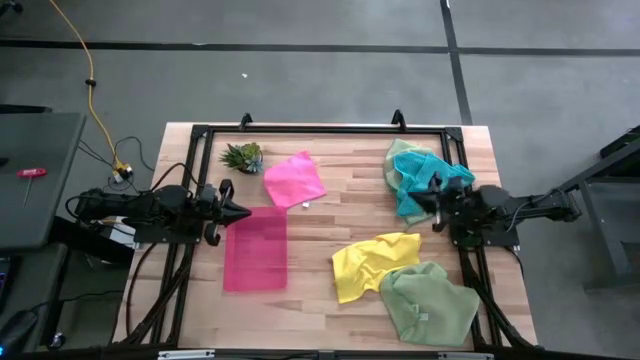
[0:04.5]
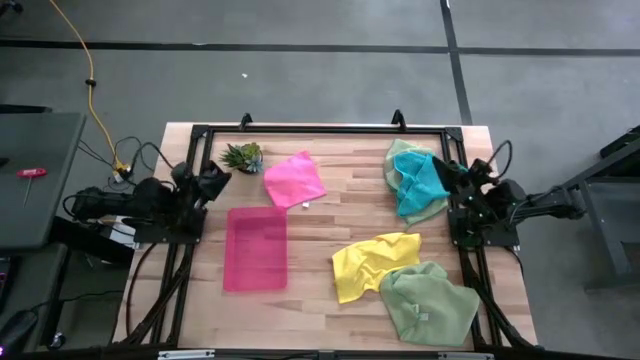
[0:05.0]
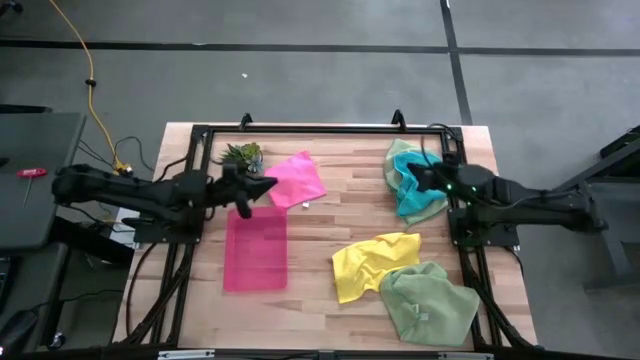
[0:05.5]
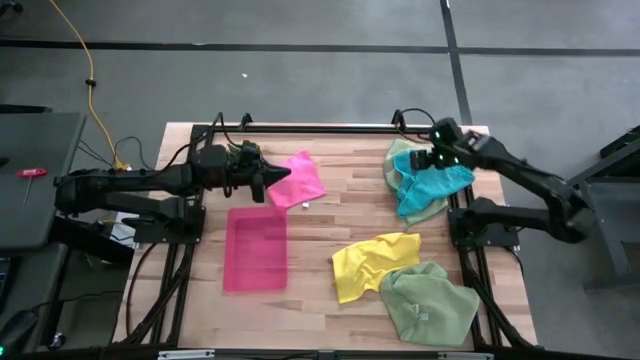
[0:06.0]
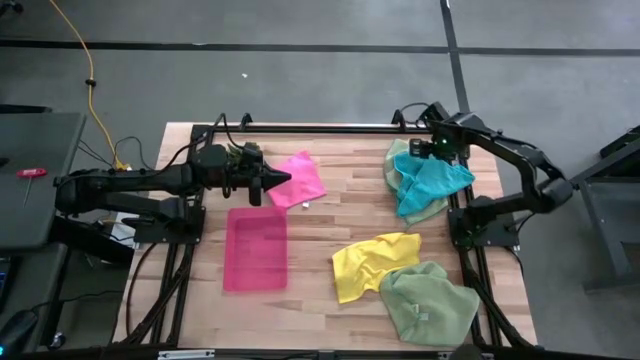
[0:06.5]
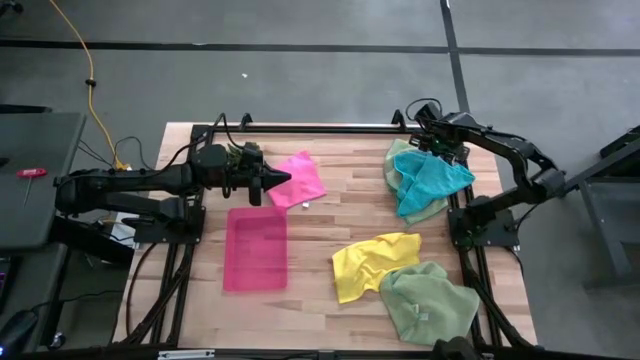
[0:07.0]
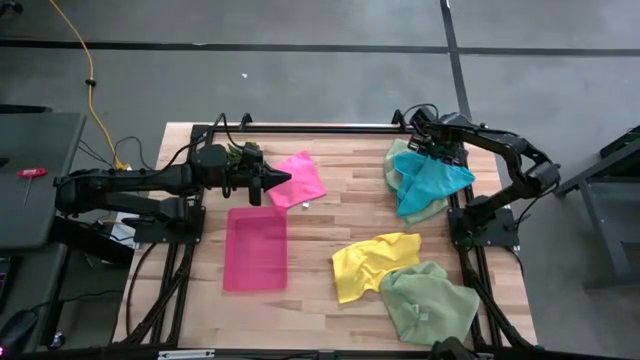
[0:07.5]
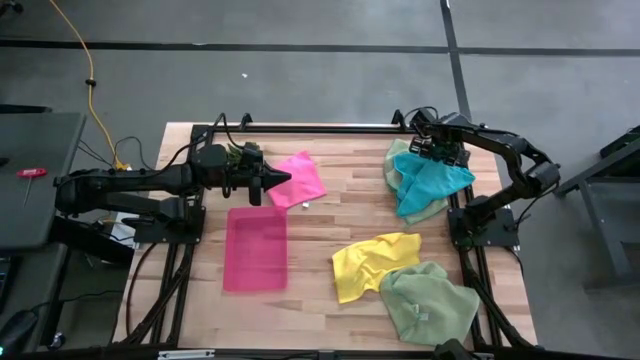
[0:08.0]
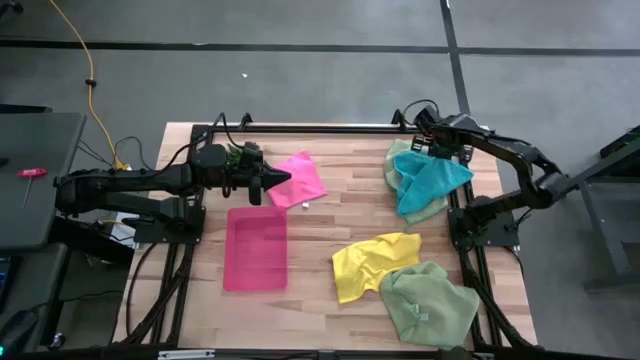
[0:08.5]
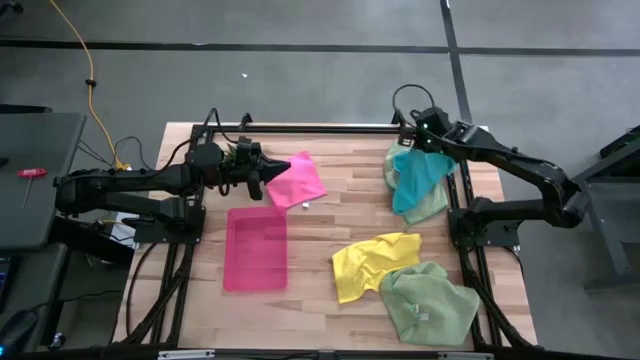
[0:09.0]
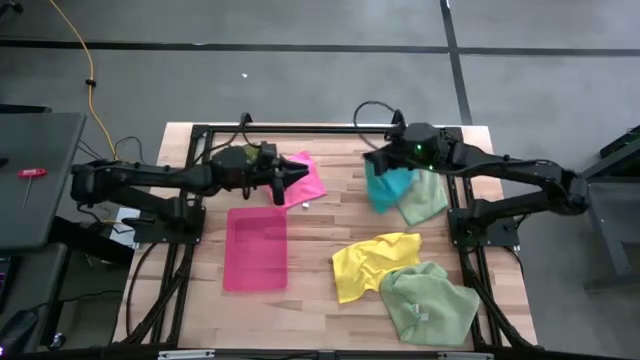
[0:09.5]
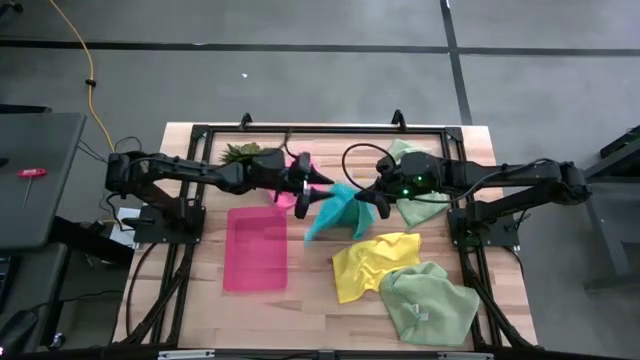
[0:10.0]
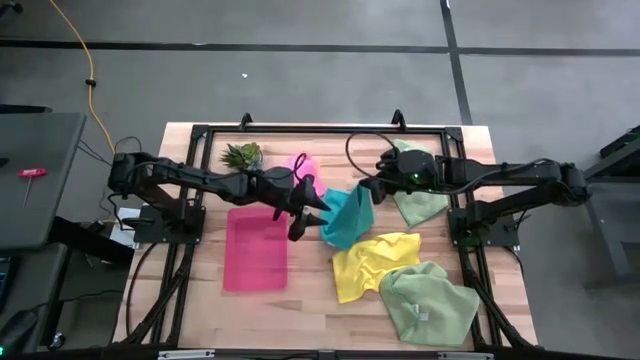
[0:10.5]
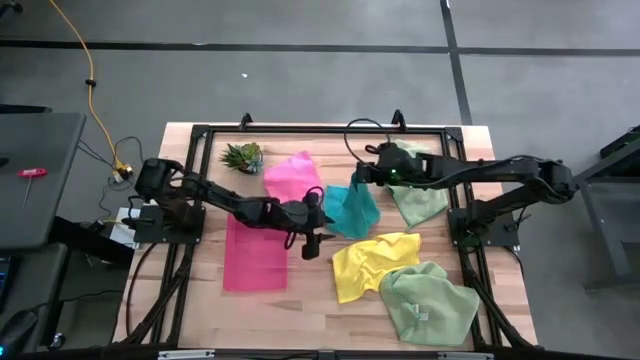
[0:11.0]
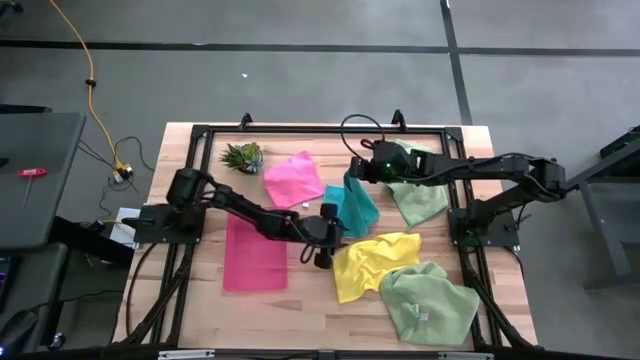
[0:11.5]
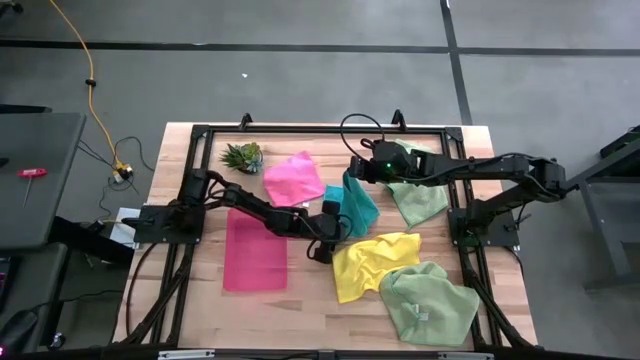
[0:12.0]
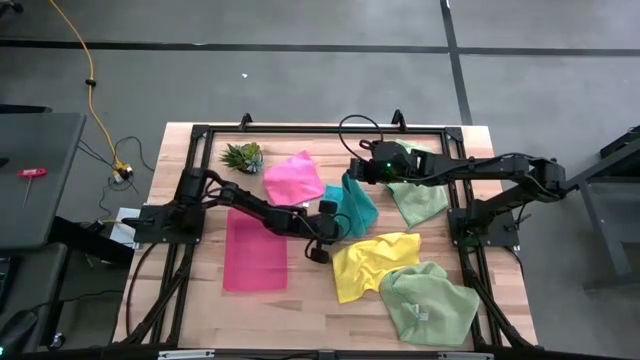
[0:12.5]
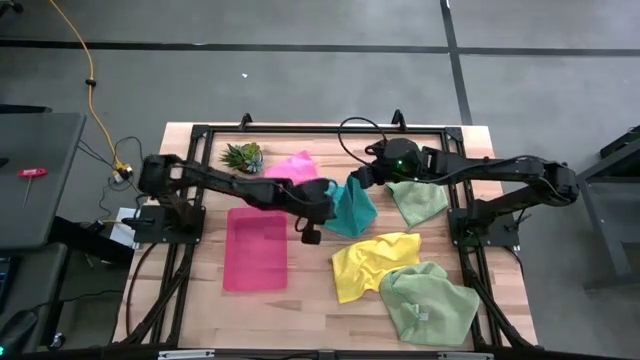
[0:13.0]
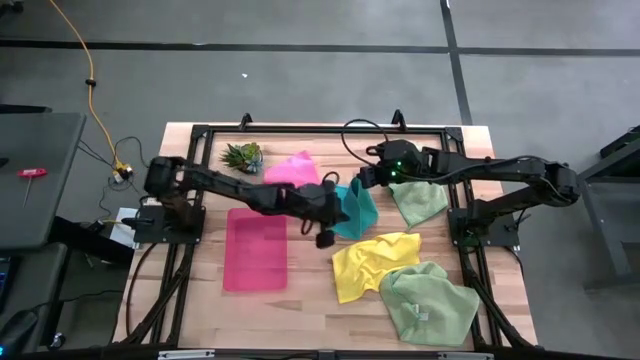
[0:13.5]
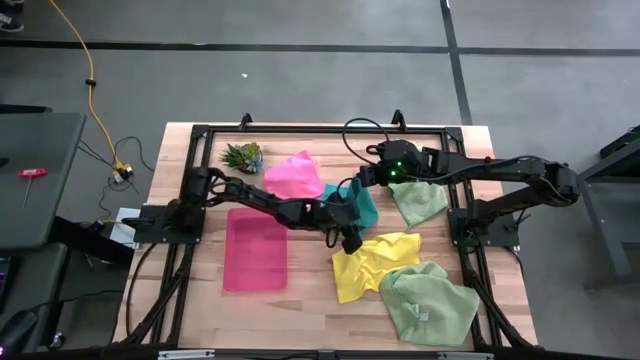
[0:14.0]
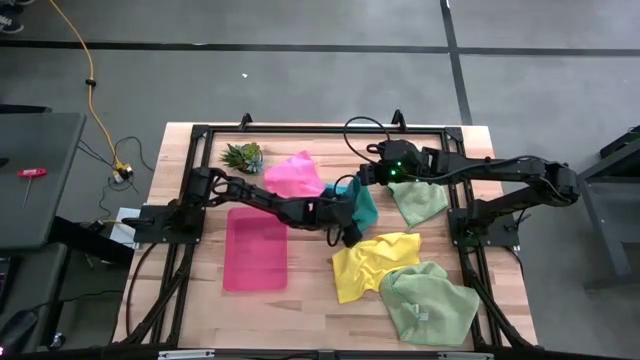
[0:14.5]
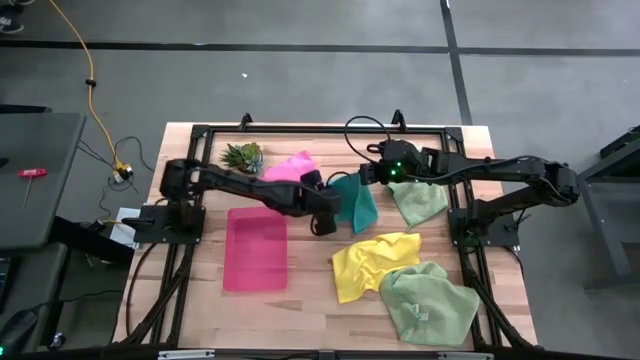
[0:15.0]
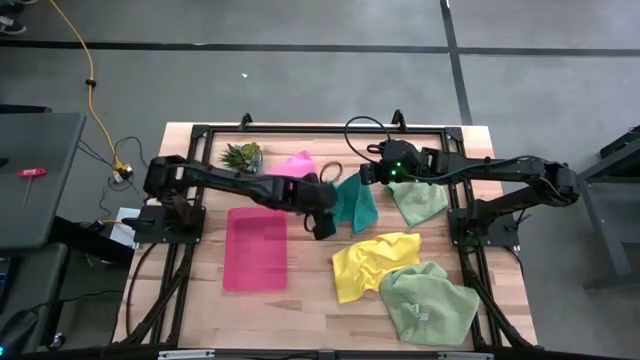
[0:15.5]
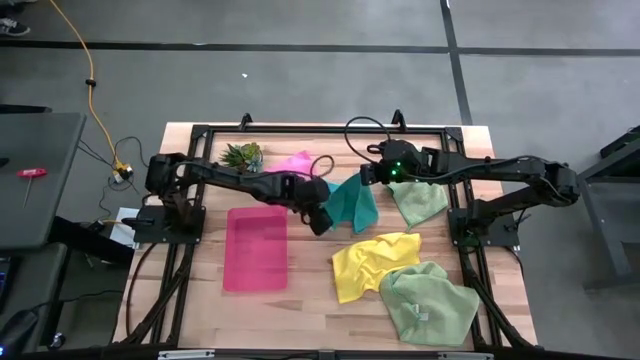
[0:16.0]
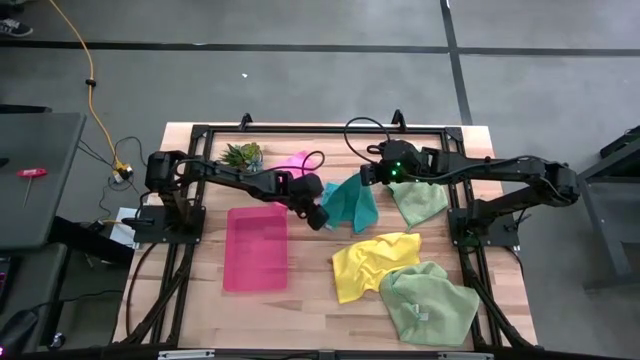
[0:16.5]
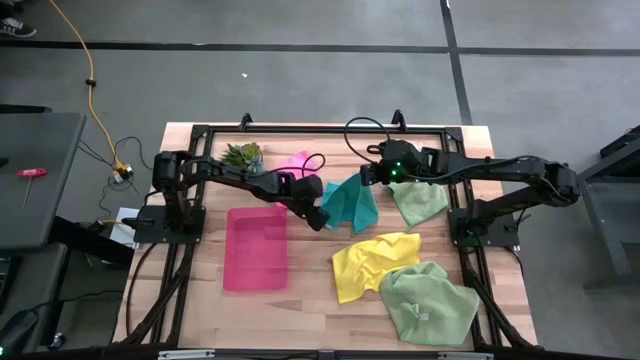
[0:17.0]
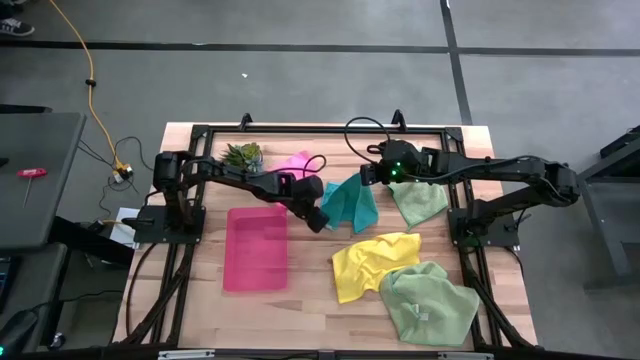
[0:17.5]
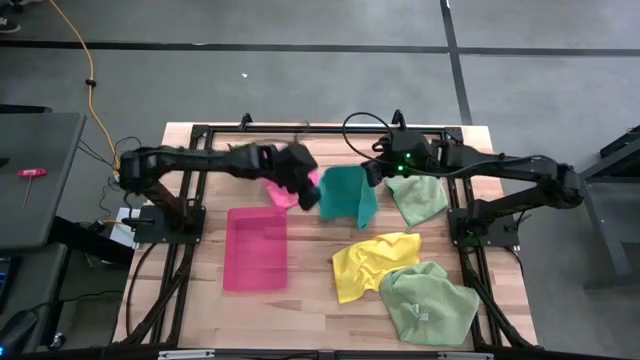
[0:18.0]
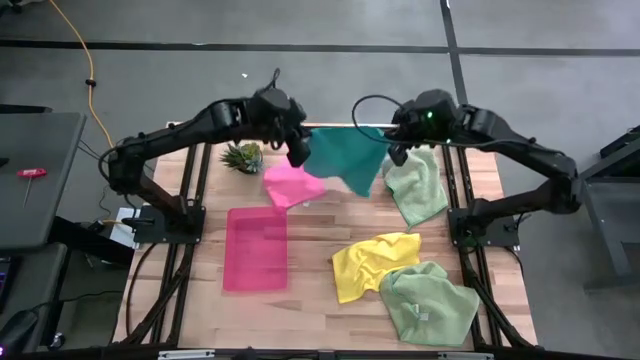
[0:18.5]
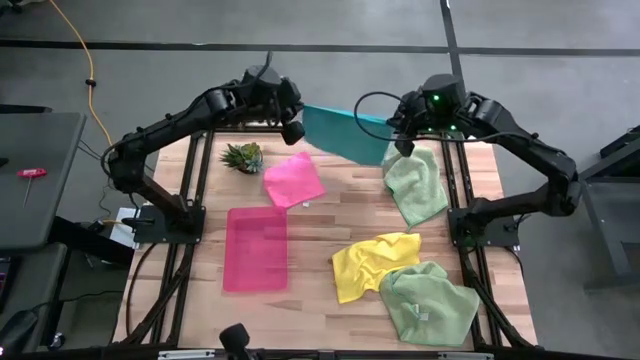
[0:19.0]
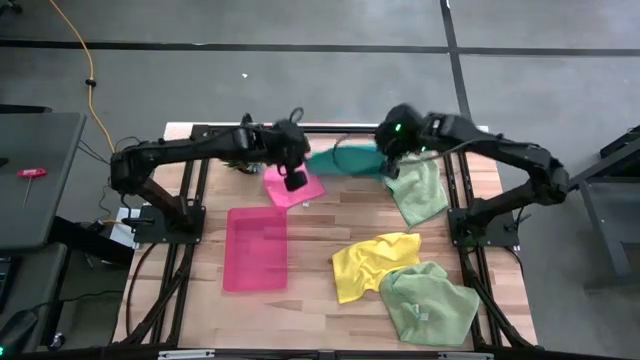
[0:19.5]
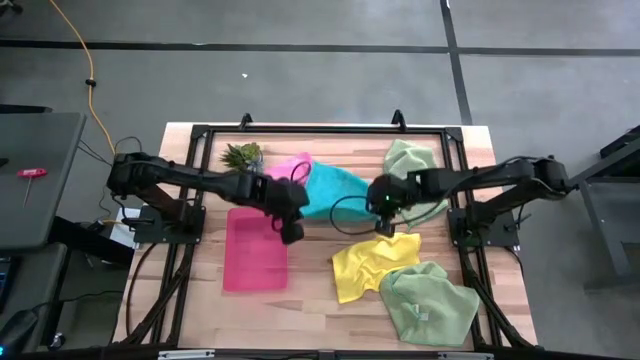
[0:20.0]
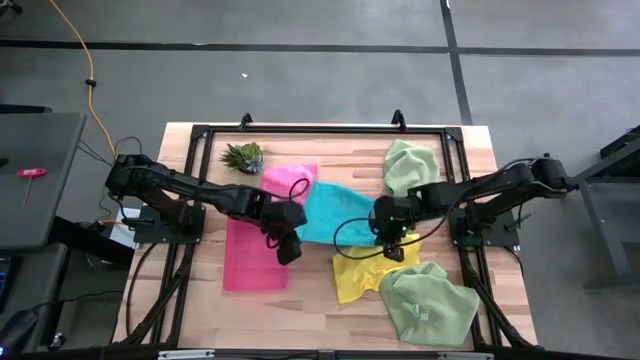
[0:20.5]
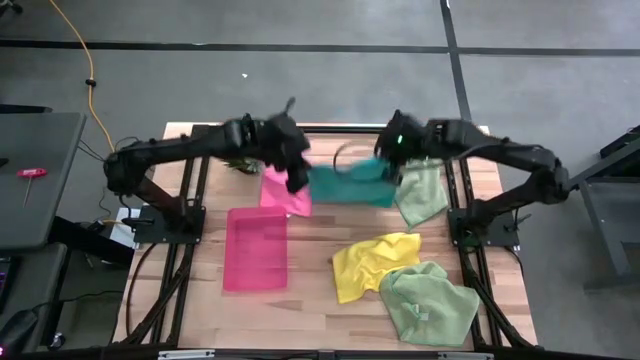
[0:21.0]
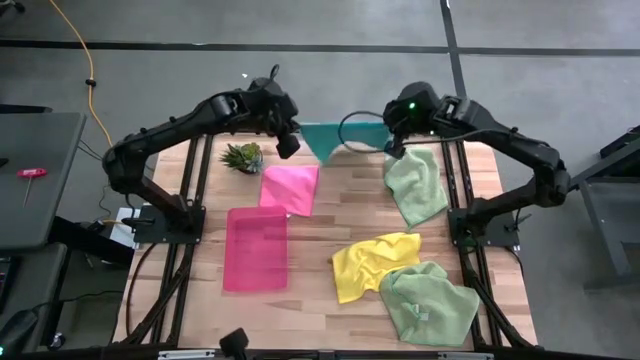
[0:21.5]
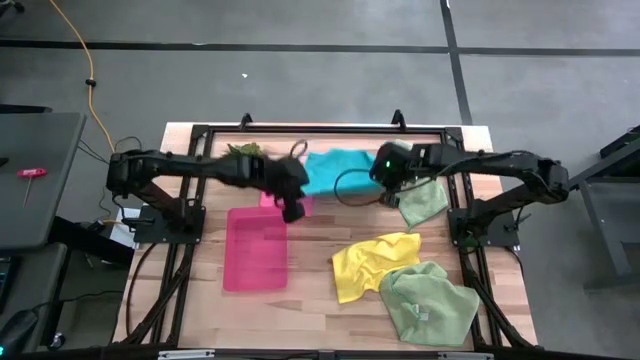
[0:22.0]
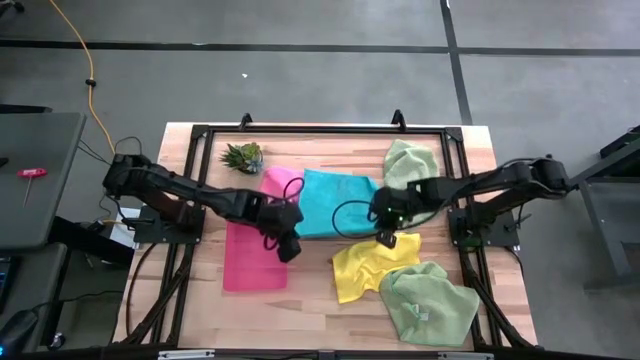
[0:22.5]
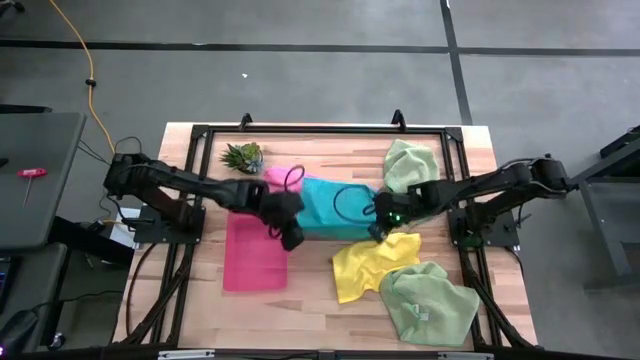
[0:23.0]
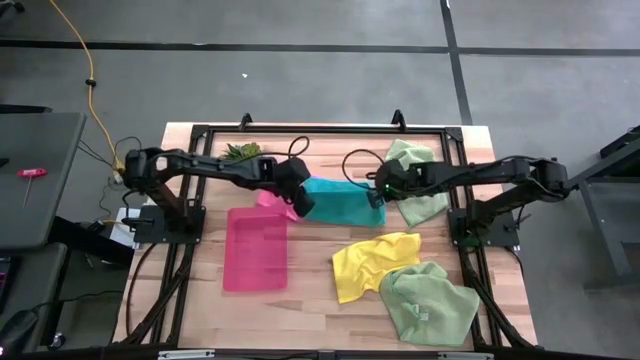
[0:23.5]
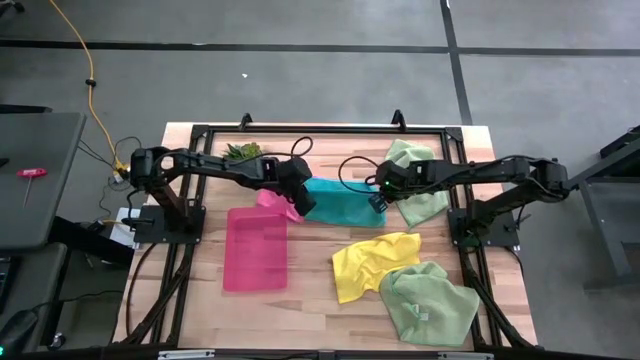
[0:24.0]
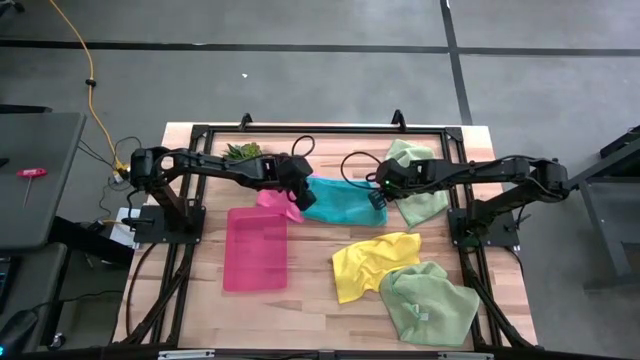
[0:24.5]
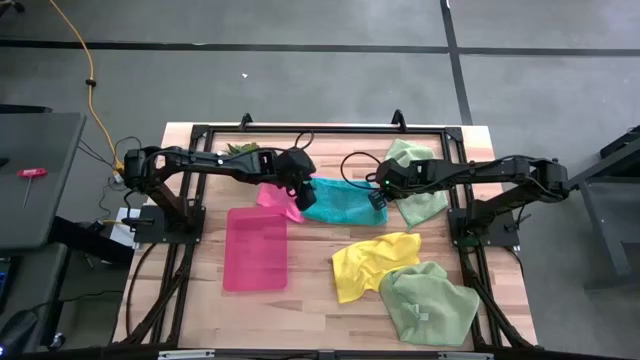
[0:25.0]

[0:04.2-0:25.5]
Task: Fold microfiber towels
Fold the blue microfiber towel
